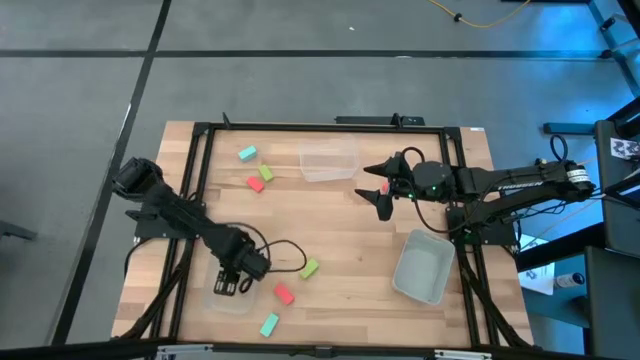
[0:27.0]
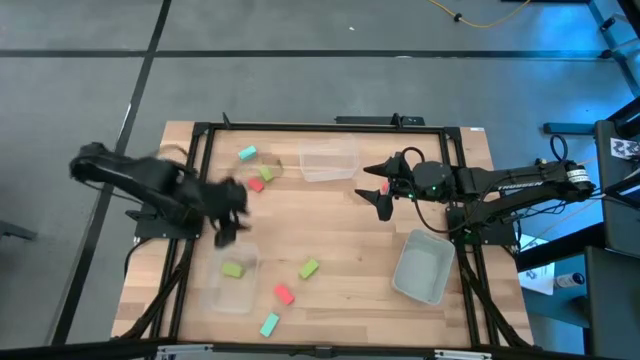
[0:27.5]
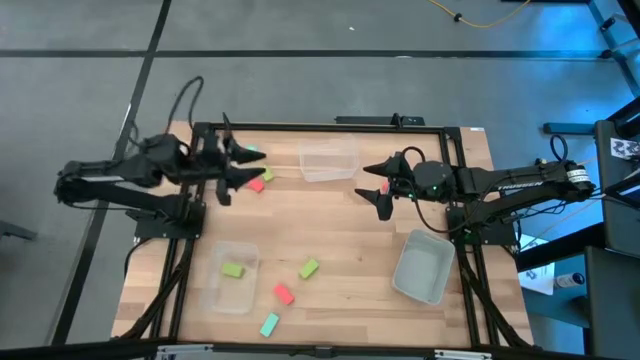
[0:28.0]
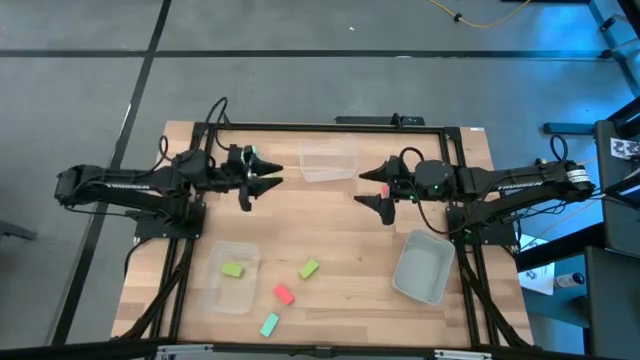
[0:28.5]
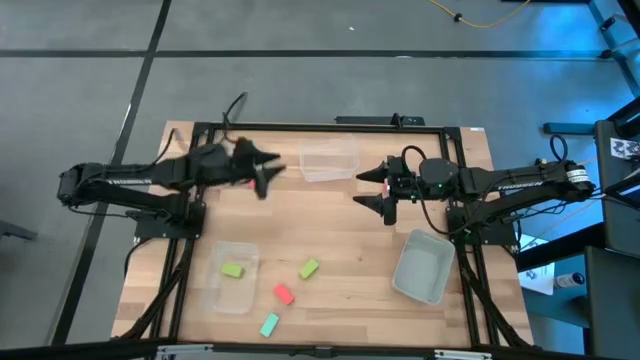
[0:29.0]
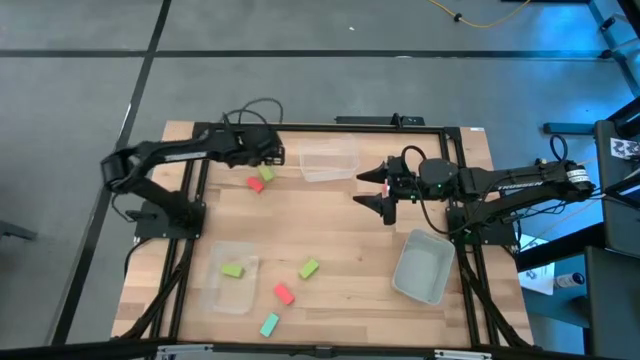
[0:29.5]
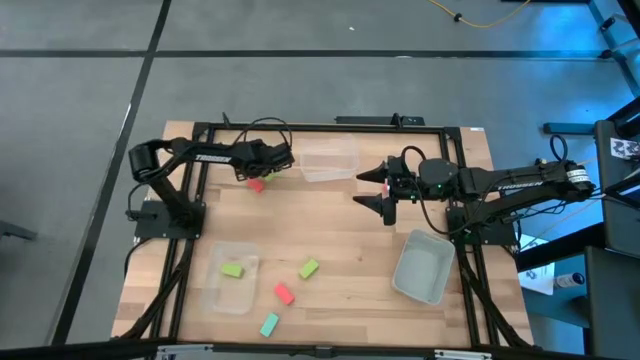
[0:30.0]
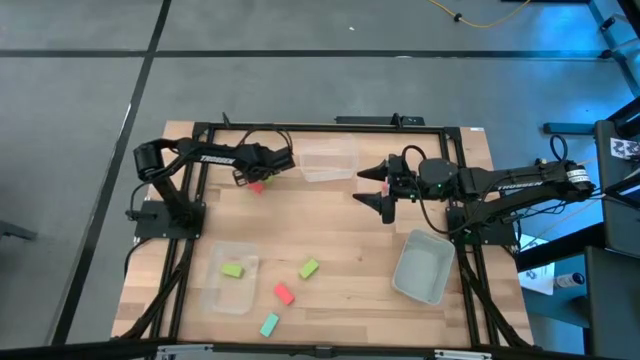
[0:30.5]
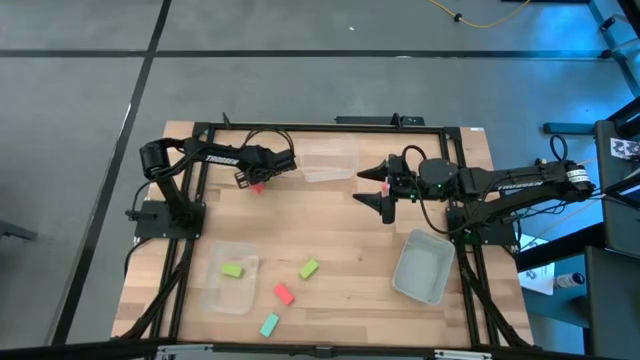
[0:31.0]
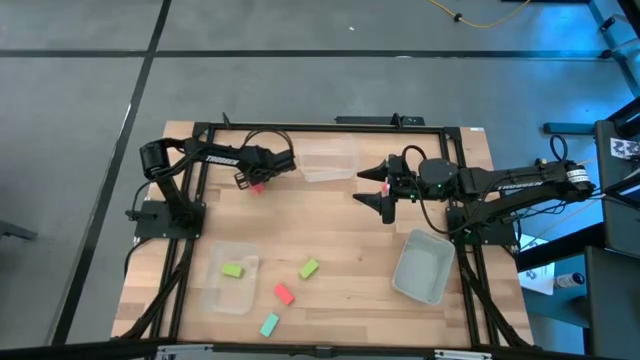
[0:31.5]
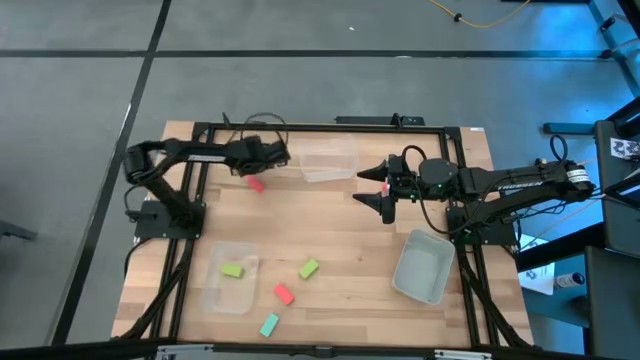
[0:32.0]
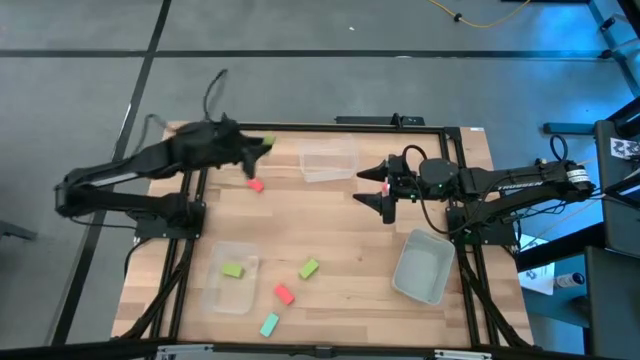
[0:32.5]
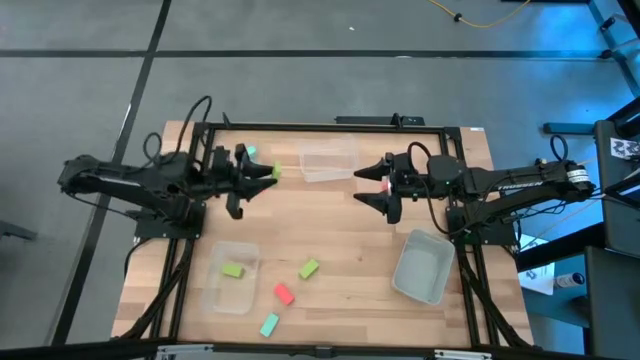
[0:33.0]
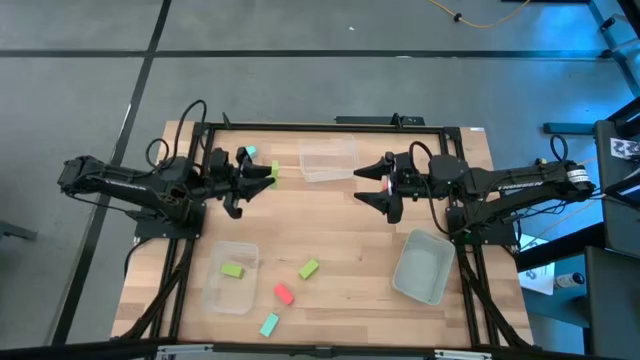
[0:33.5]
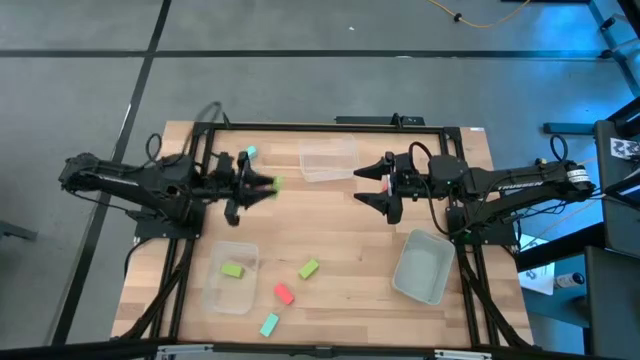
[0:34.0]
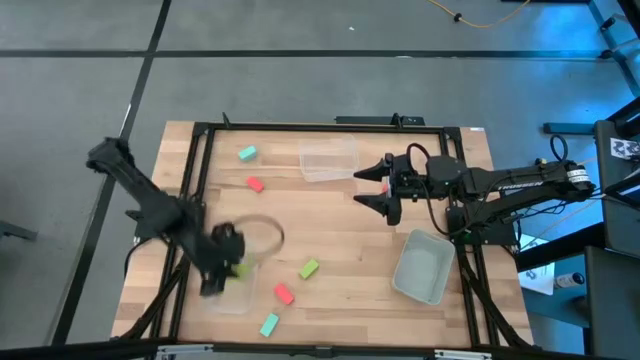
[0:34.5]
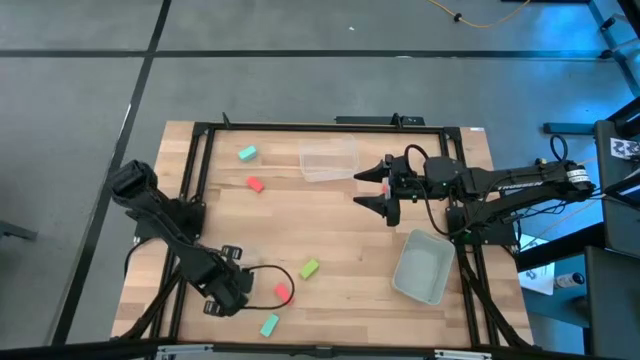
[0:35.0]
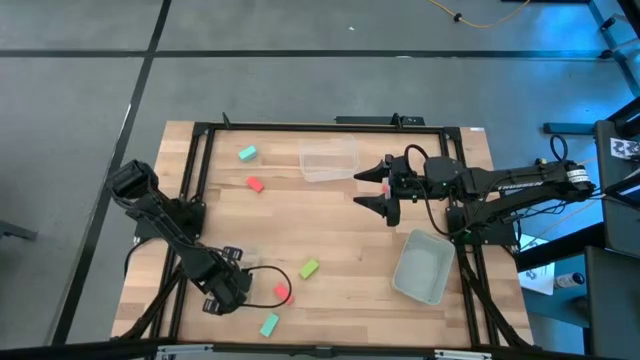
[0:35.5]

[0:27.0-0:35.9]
Task: Sort & place blocks by color
Put the top green block into the bottom left transparent bin

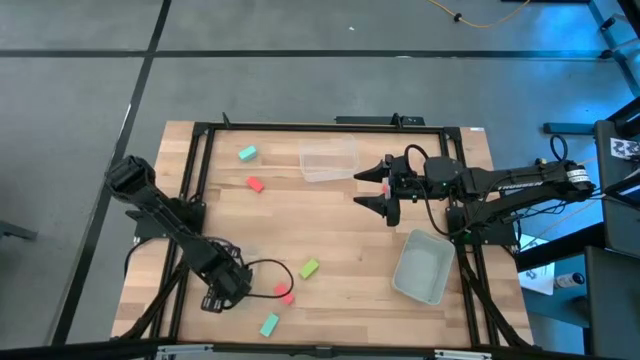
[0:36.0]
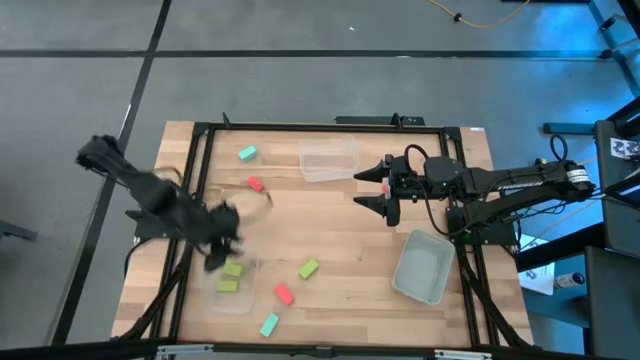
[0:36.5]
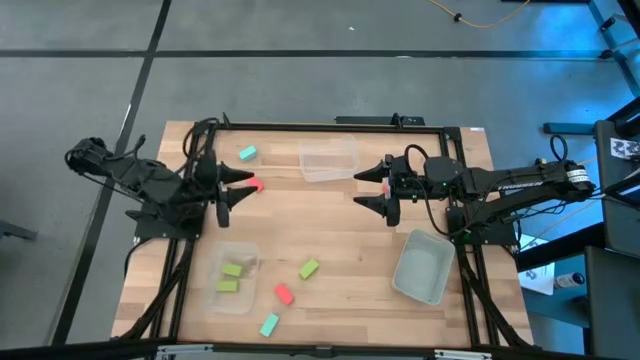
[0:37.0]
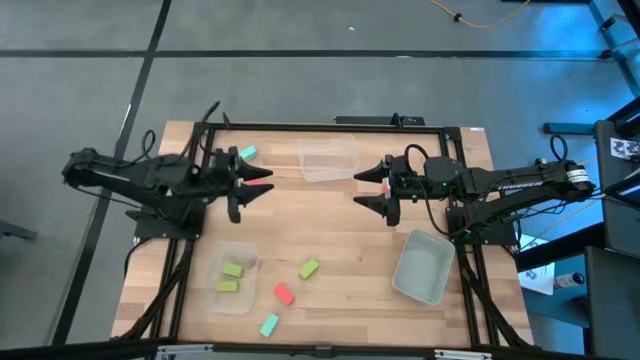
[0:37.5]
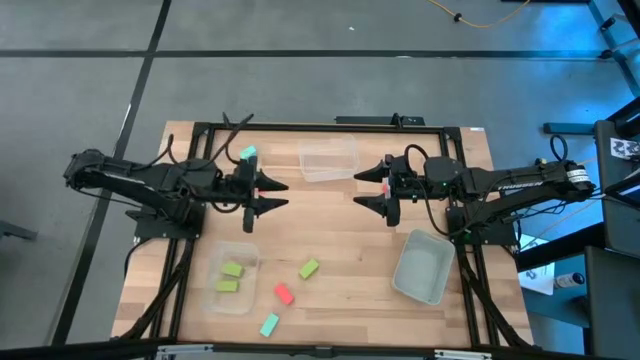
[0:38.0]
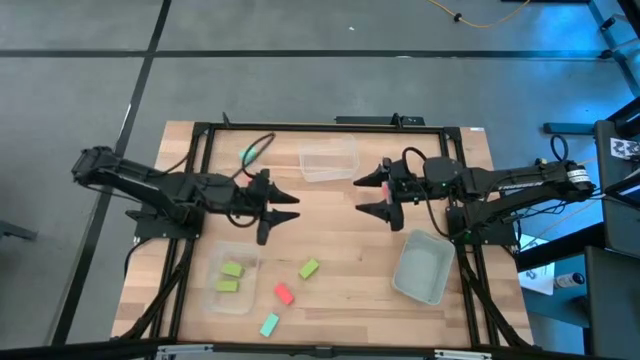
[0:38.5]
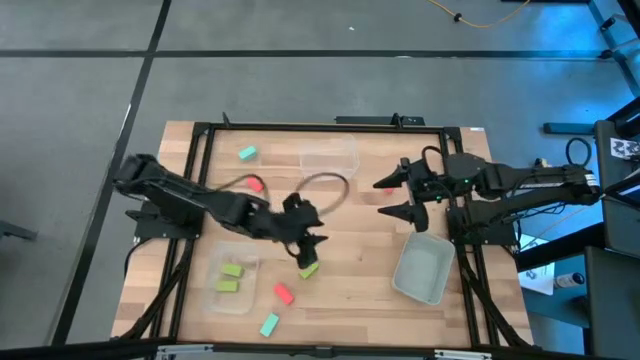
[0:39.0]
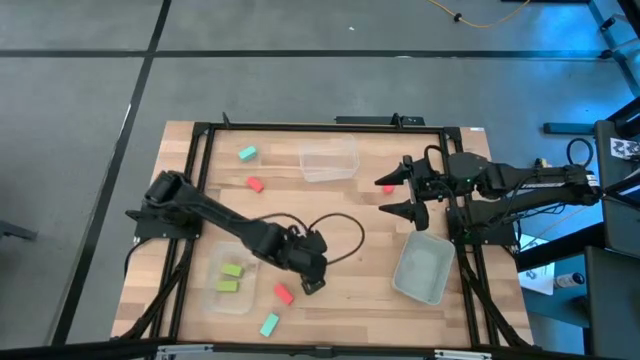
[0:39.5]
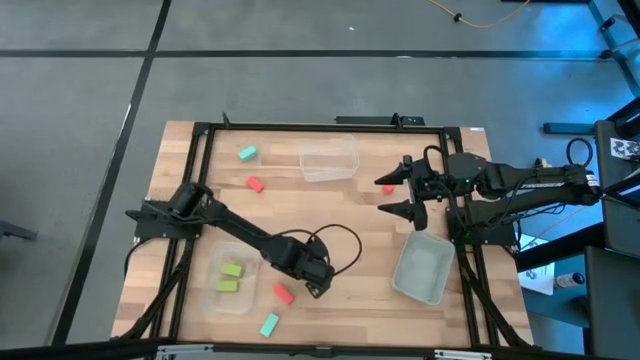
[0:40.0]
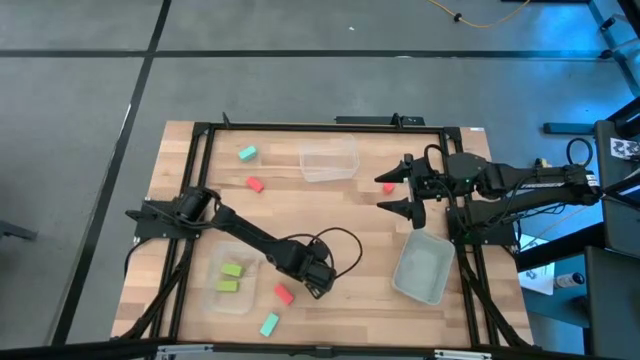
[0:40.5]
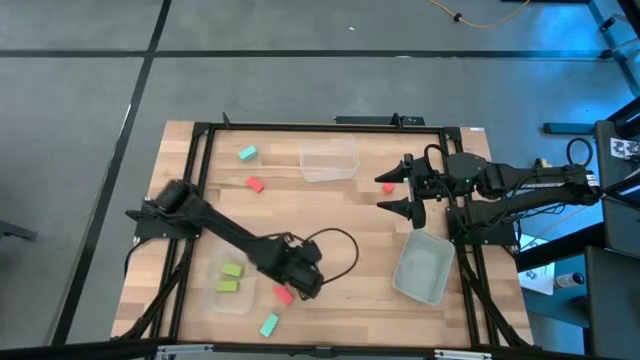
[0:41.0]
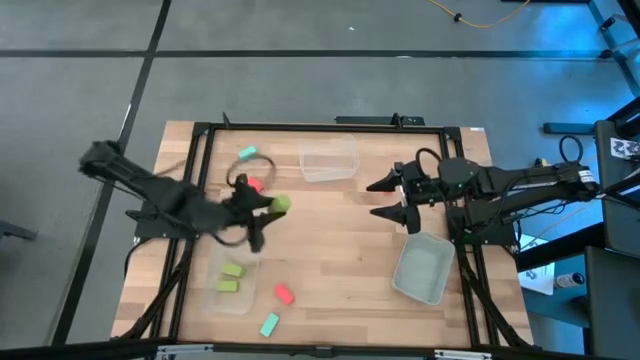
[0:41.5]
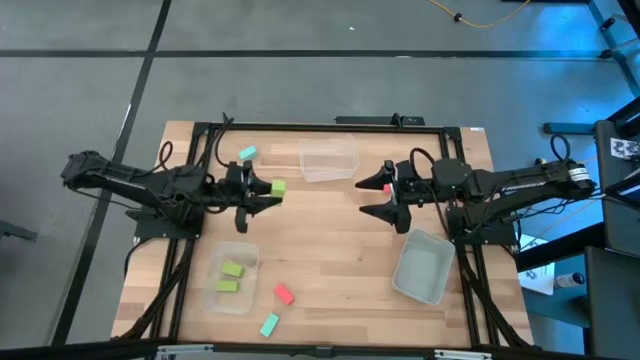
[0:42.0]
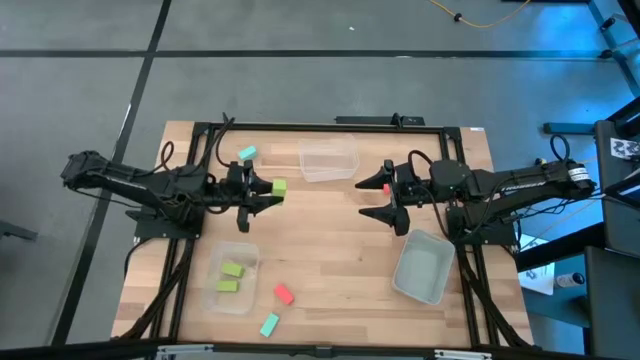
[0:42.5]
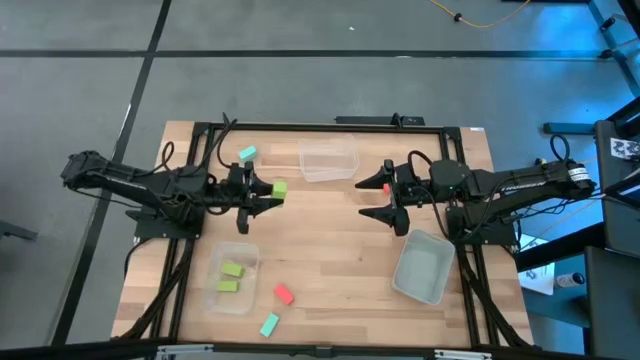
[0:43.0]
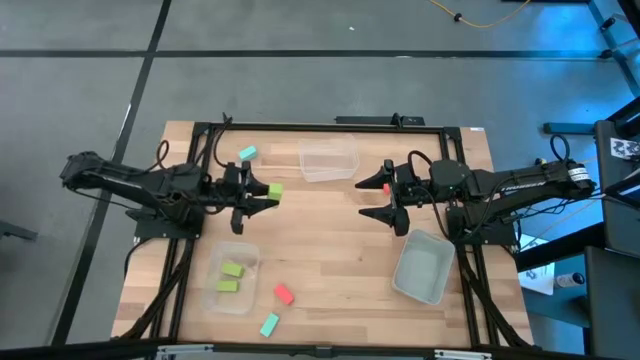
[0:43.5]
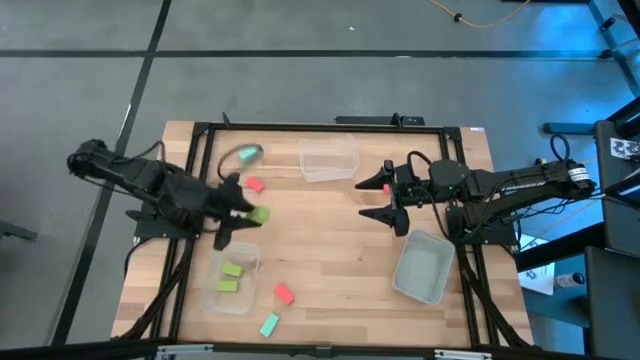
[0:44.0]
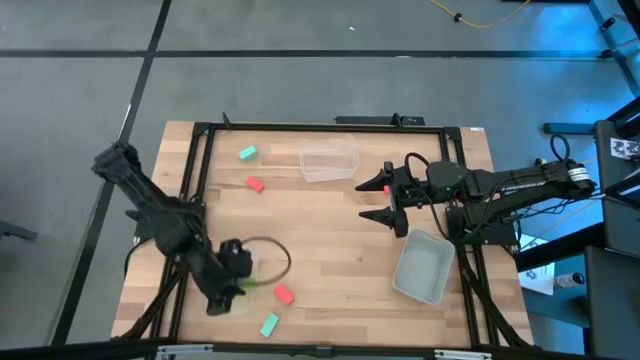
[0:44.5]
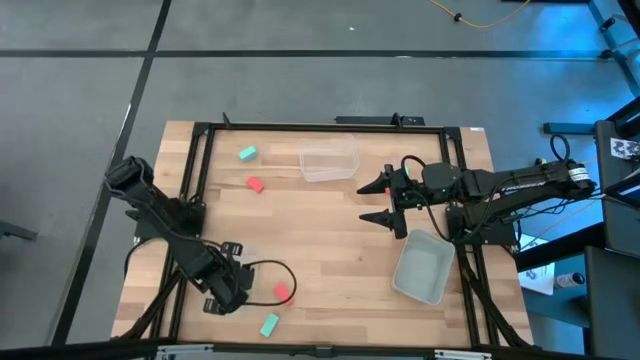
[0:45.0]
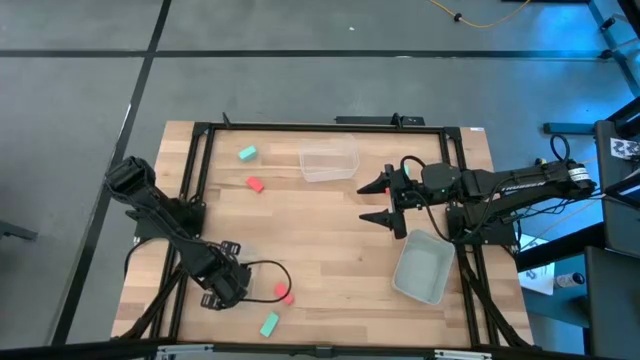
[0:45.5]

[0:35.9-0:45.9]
Put the green block into the bottom left transparent bin
